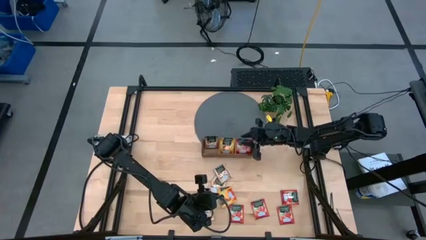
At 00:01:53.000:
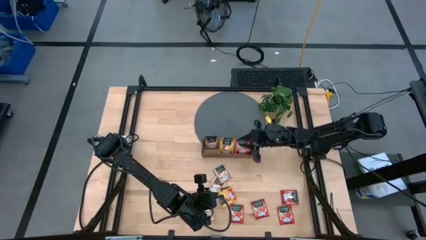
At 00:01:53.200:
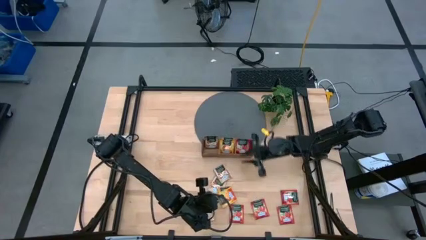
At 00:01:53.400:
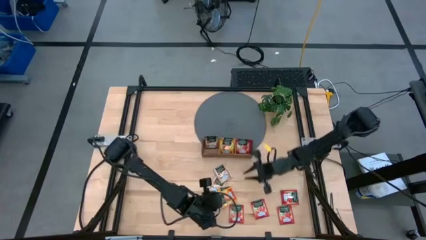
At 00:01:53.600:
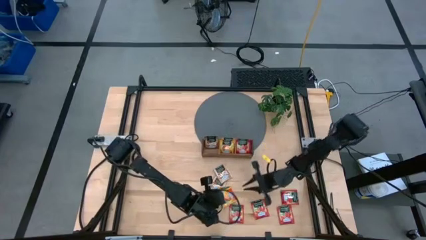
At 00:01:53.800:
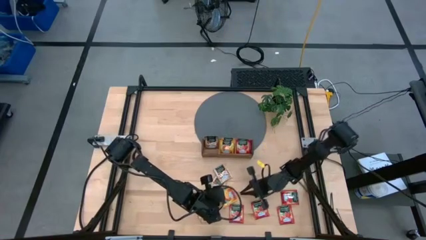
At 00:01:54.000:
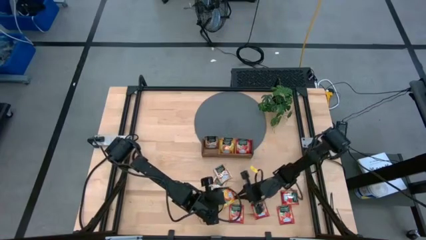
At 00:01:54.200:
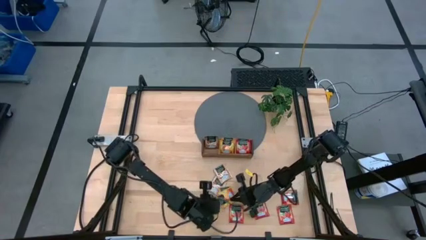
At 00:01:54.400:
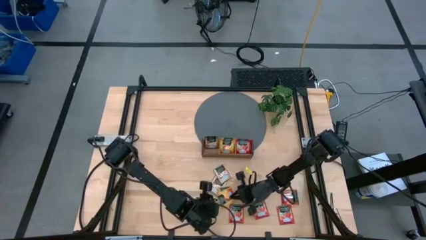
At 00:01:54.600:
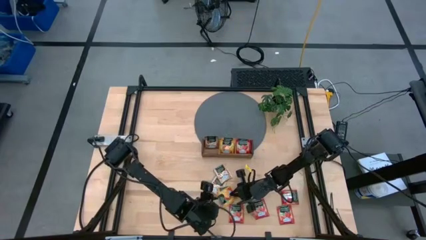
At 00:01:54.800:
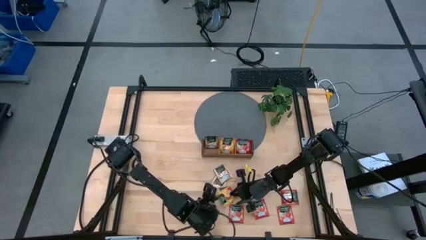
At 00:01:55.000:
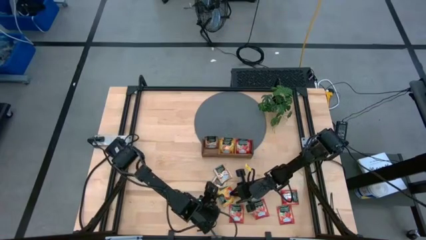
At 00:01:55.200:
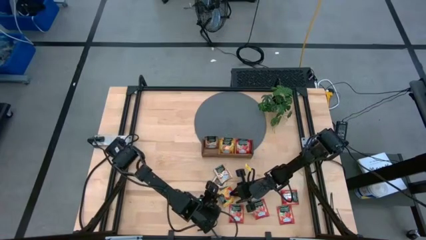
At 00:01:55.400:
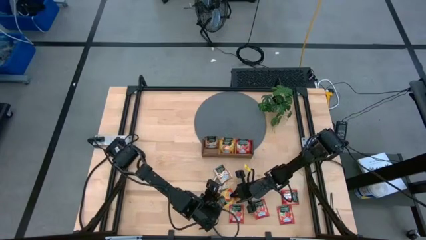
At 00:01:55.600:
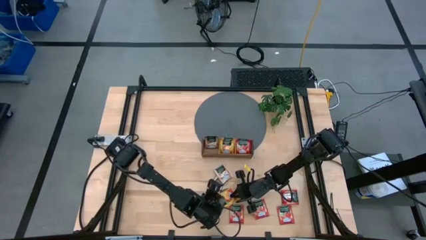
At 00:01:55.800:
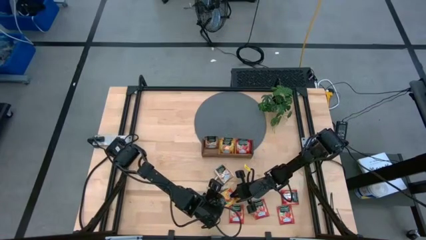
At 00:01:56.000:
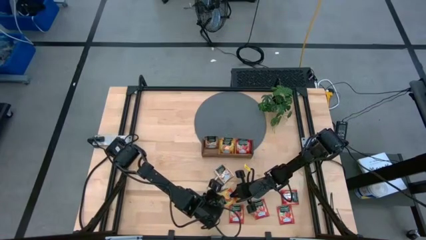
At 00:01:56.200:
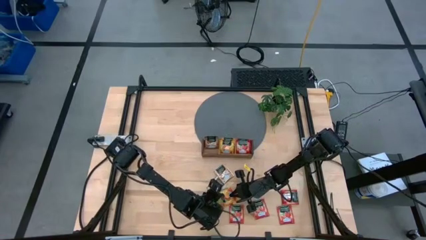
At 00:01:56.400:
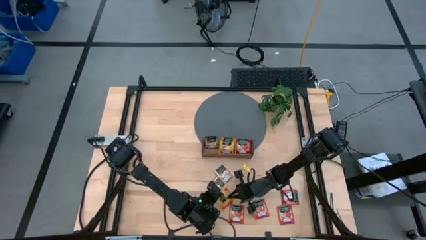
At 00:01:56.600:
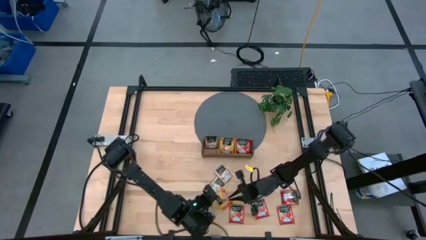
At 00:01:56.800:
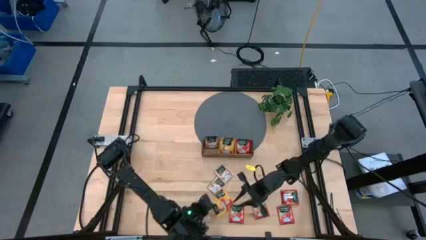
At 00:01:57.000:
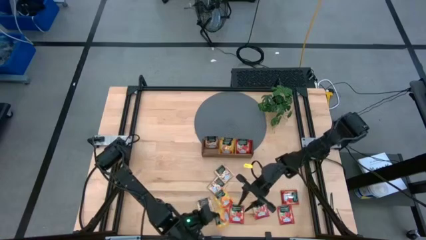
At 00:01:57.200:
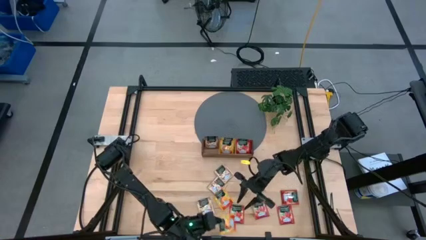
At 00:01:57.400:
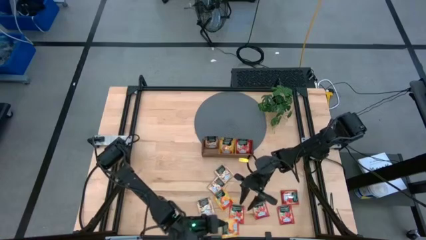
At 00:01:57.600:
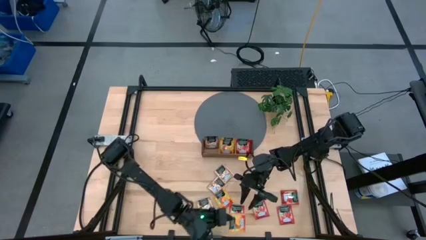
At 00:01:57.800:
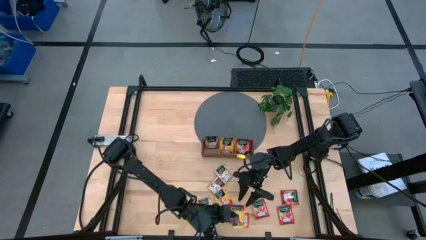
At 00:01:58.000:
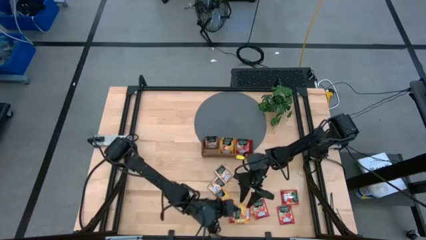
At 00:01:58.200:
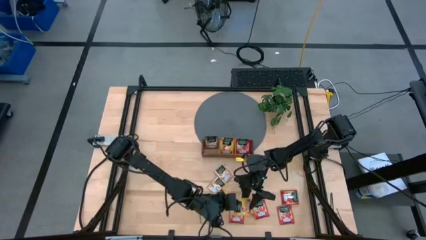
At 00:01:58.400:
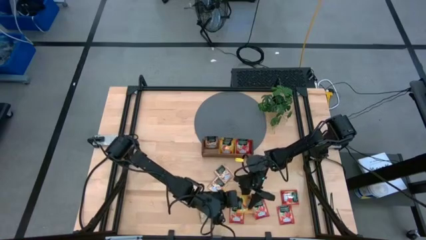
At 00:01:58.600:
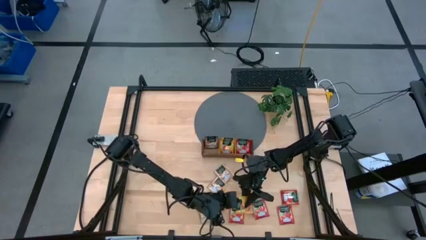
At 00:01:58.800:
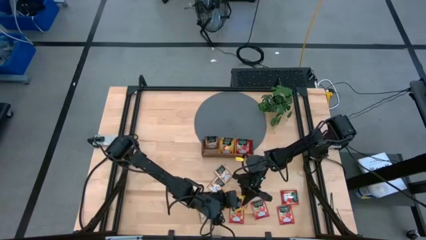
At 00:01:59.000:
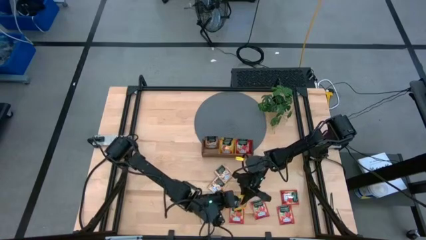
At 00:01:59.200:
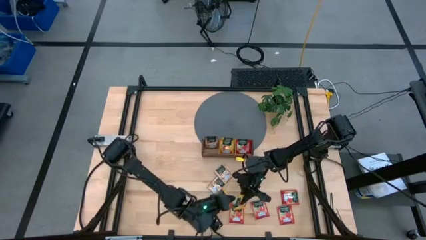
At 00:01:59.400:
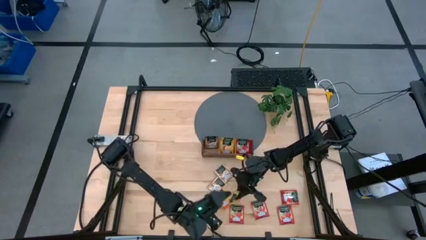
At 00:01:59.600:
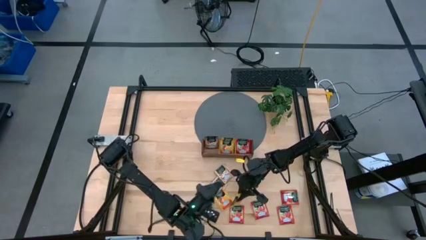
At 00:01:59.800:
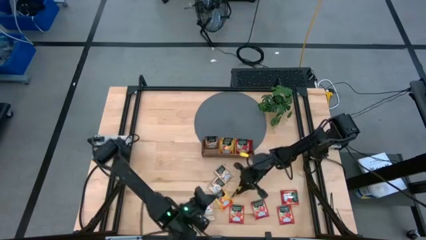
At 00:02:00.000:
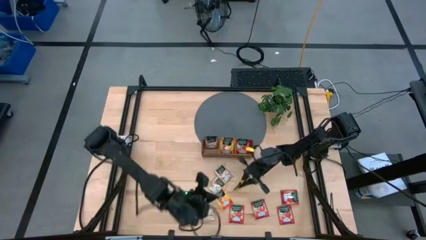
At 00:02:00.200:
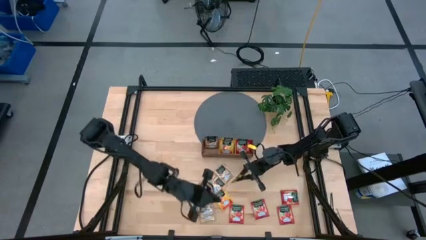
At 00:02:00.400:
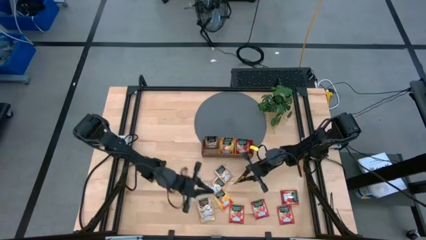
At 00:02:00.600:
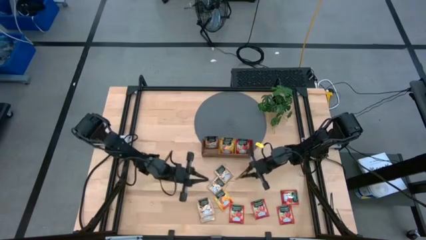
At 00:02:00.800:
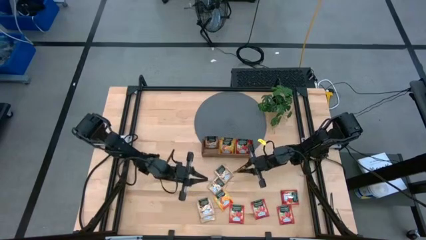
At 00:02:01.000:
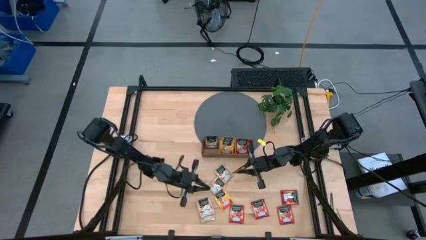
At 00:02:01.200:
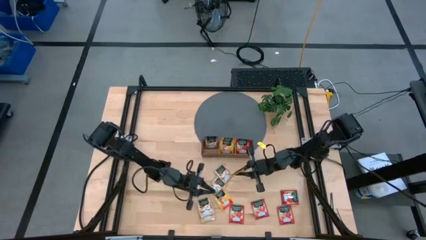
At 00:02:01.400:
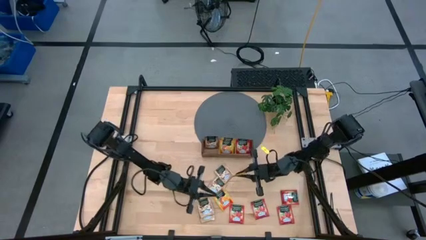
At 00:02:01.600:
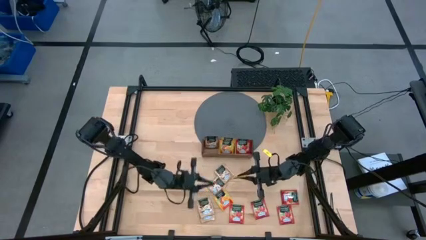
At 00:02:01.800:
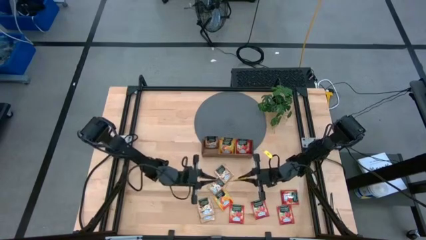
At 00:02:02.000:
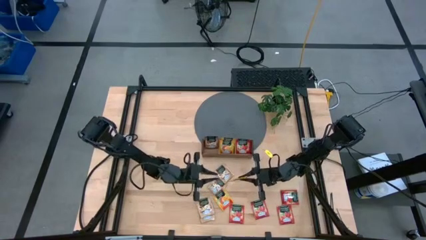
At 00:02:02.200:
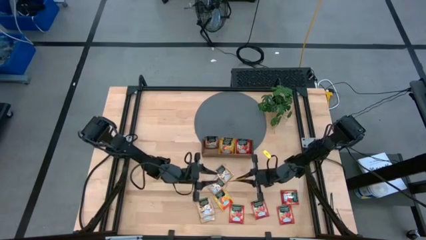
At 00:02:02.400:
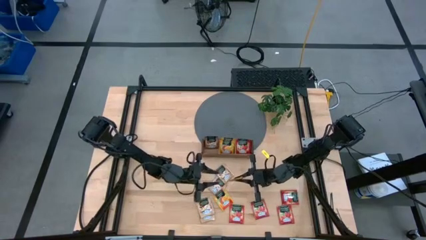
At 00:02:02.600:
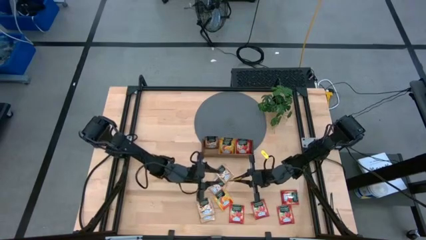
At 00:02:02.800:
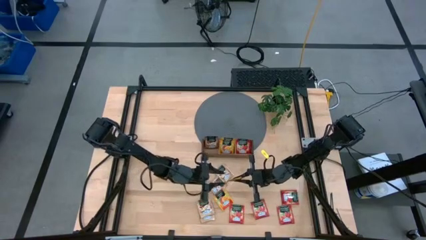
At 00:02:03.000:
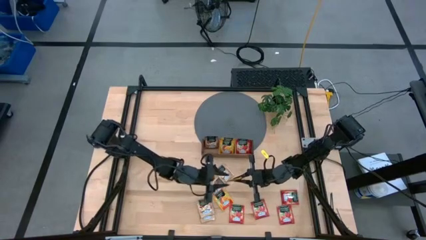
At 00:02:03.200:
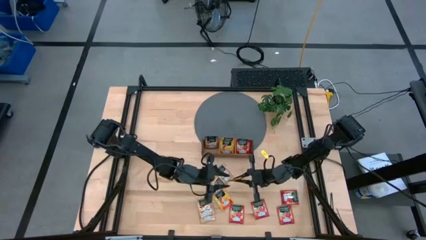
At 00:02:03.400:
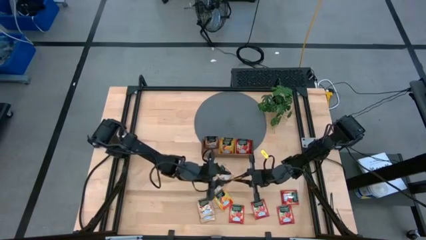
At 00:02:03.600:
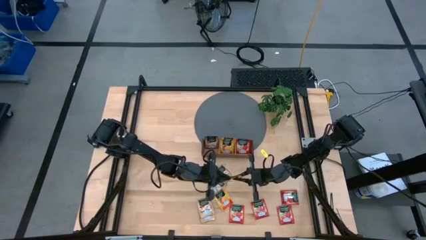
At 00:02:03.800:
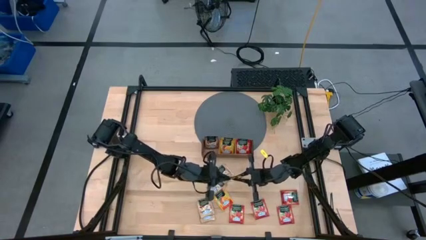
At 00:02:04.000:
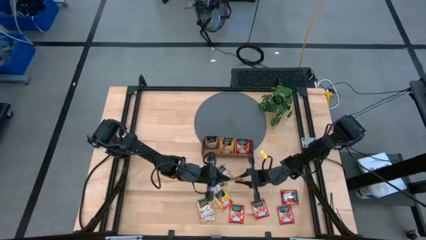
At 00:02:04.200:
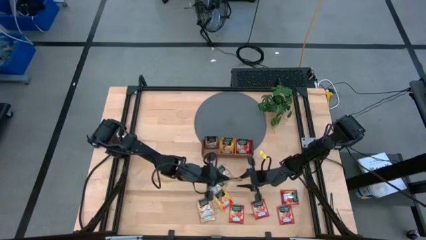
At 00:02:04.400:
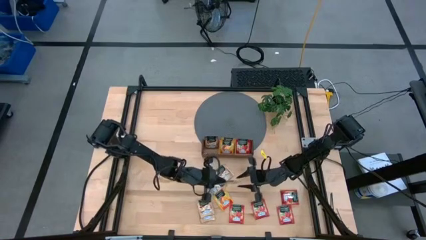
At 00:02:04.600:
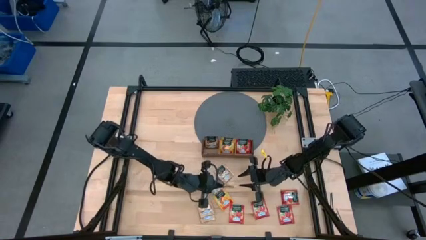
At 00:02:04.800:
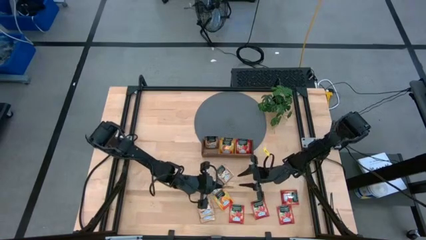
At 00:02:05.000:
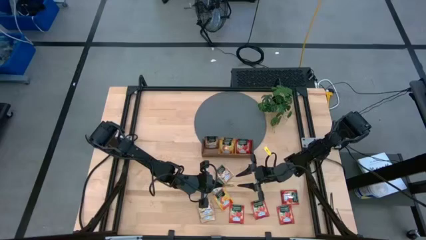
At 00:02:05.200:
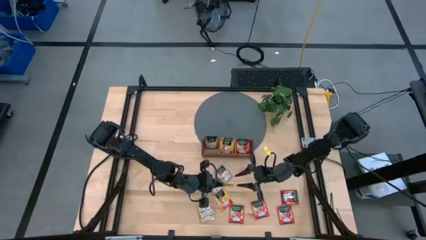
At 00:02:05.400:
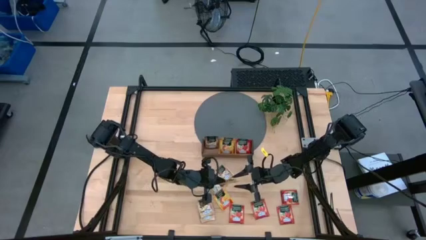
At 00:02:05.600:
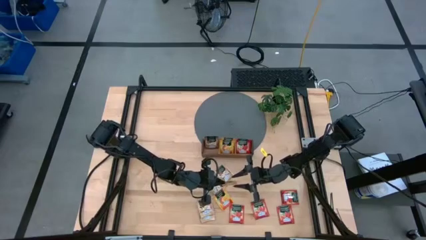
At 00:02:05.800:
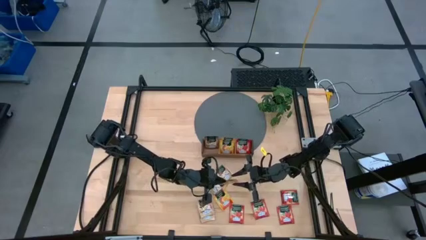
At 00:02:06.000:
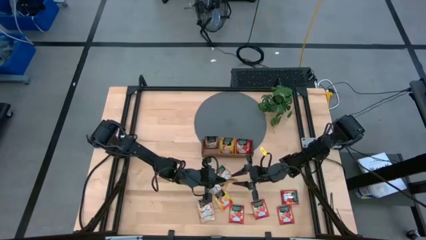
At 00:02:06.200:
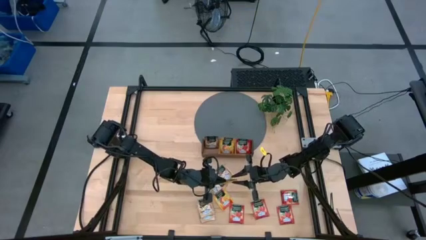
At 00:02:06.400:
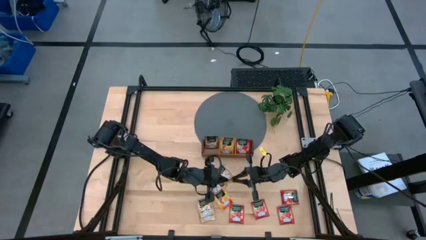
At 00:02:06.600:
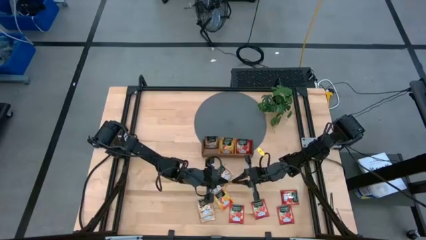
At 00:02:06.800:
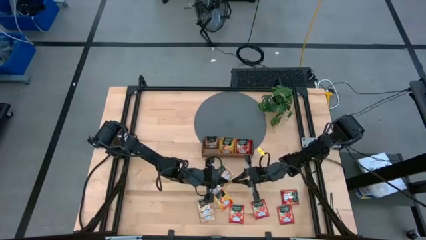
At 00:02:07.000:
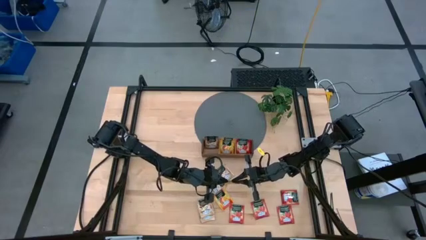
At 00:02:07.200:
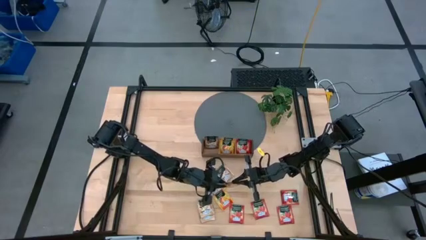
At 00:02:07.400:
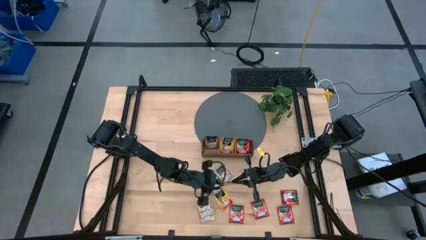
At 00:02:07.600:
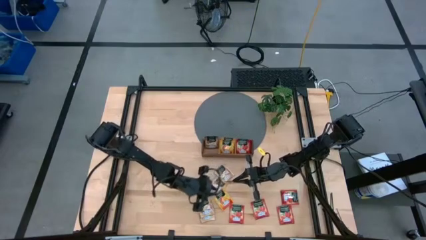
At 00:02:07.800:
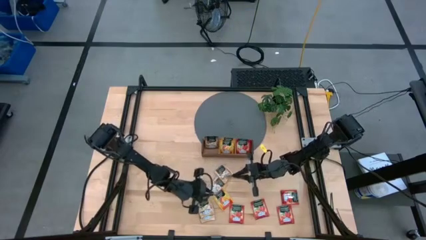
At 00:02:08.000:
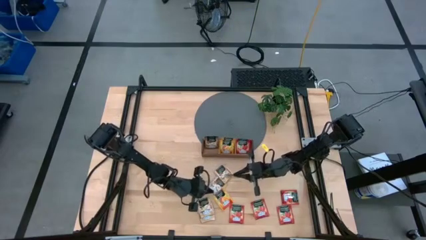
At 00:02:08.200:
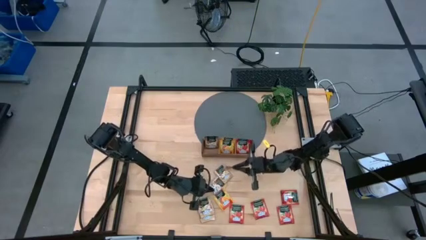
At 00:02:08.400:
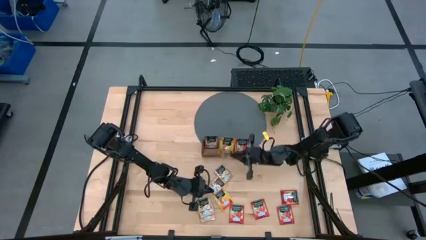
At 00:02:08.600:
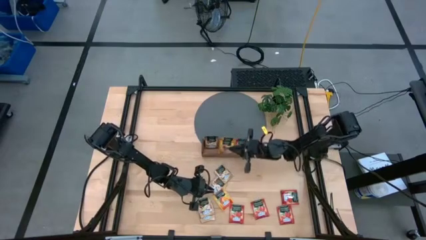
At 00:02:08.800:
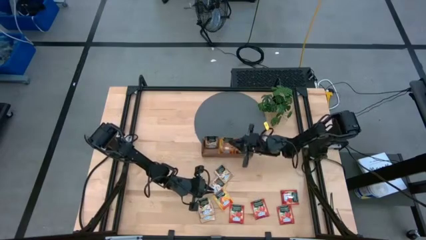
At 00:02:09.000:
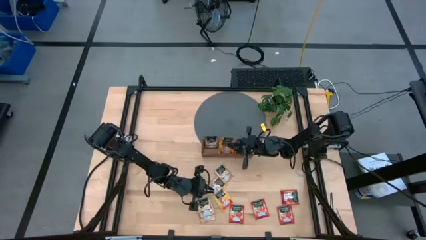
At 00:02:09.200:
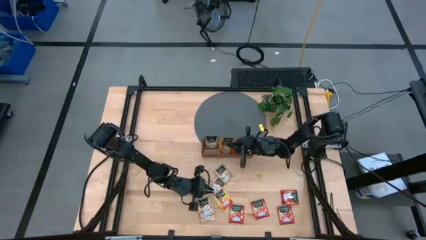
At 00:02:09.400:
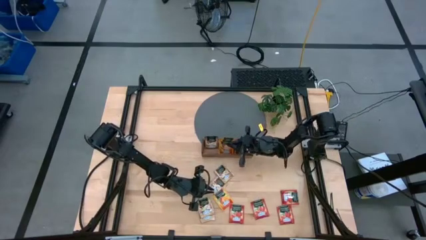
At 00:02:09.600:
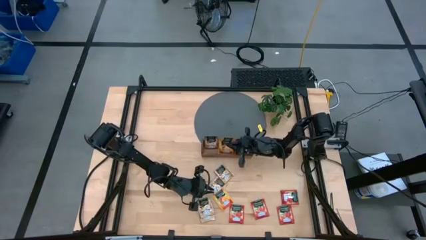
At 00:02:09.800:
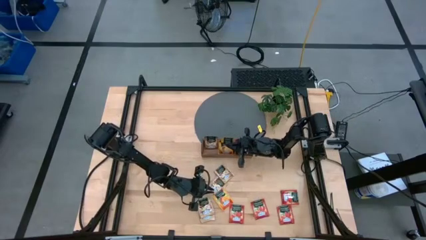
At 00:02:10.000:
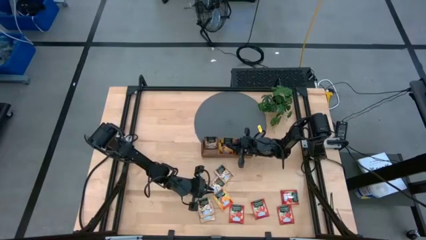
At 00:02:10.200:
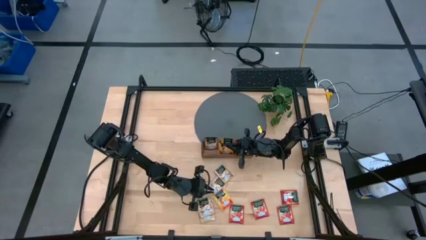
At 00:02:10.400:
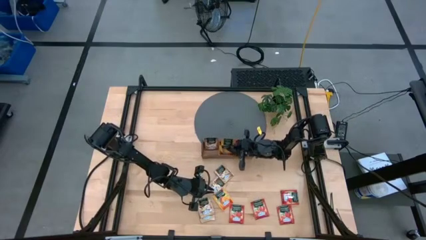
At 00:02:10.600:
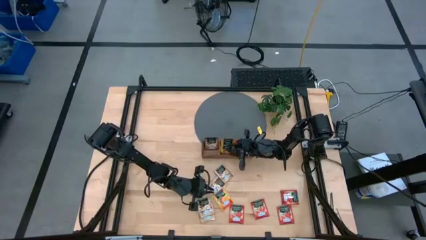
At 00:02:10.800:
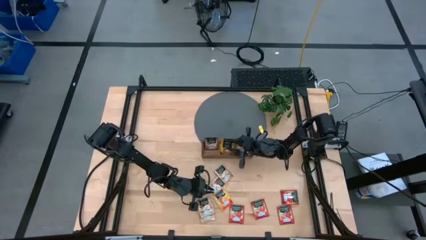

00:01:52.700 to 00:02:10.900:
Task: Pick & Place Tea
Put the yellow tea bag into the middle wooden organizer
